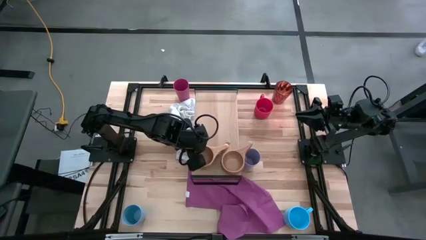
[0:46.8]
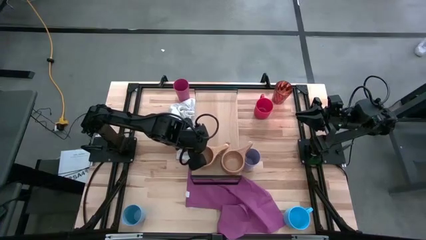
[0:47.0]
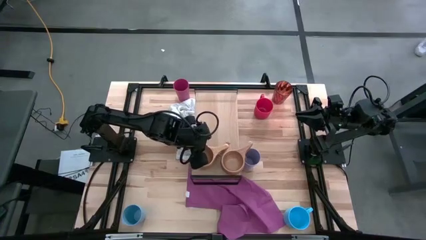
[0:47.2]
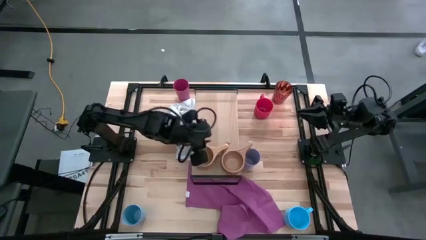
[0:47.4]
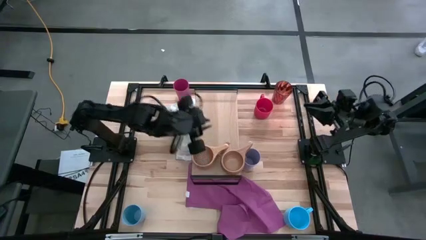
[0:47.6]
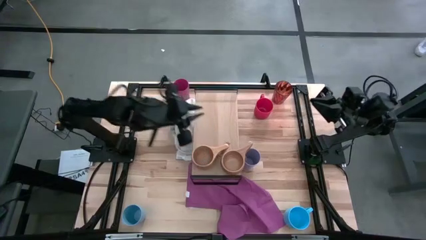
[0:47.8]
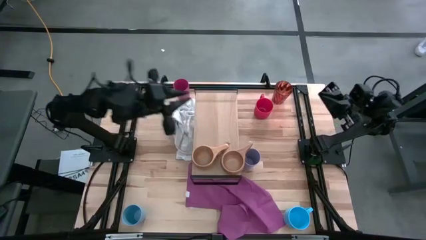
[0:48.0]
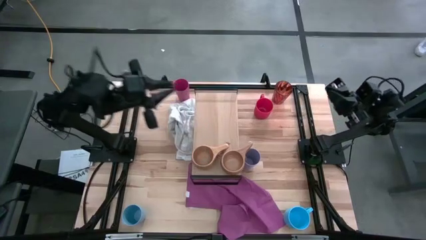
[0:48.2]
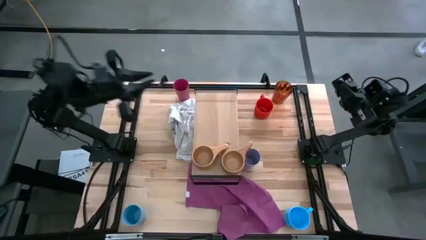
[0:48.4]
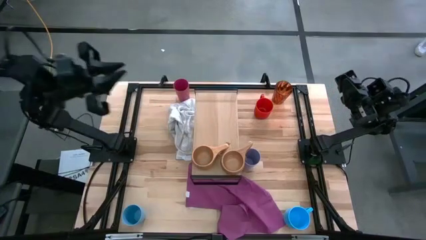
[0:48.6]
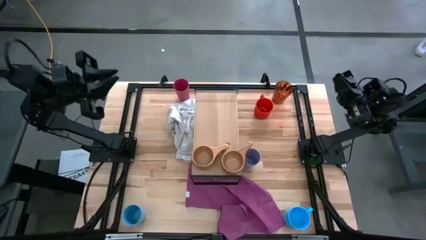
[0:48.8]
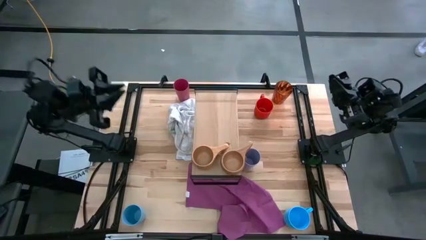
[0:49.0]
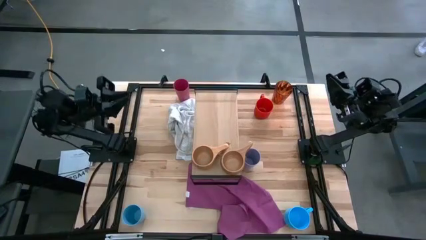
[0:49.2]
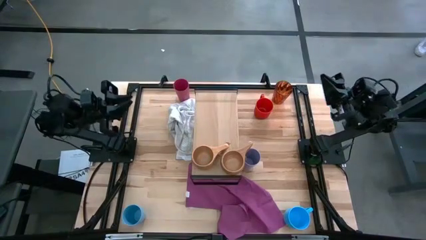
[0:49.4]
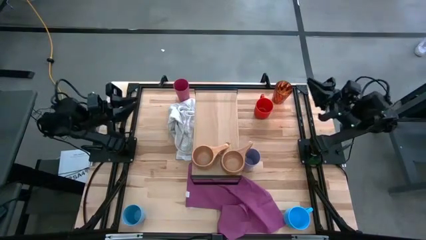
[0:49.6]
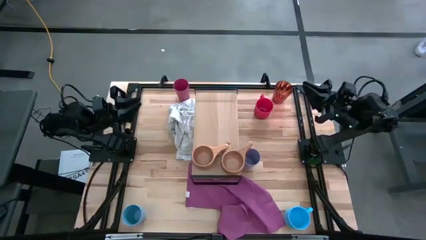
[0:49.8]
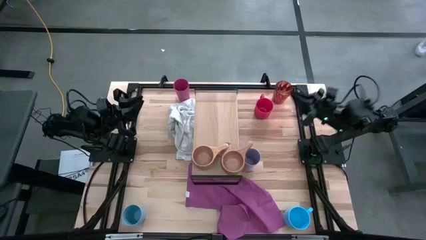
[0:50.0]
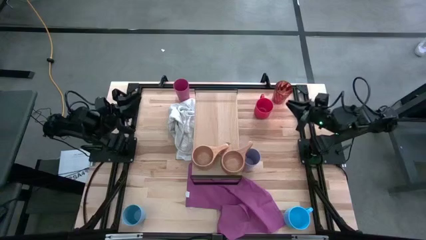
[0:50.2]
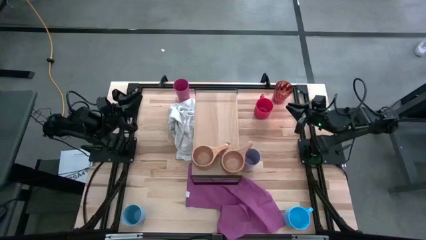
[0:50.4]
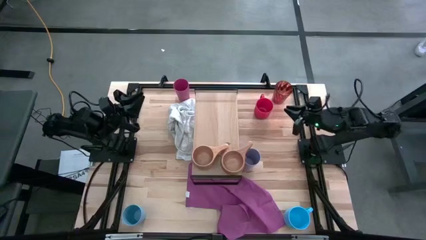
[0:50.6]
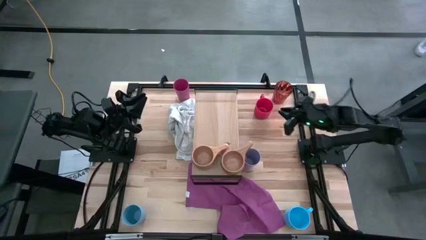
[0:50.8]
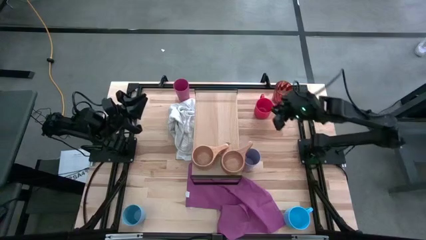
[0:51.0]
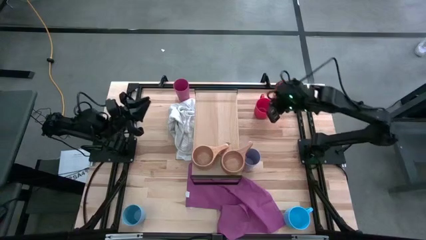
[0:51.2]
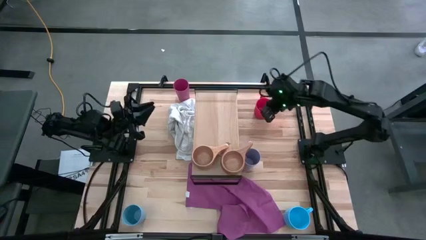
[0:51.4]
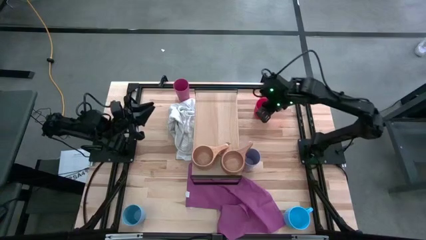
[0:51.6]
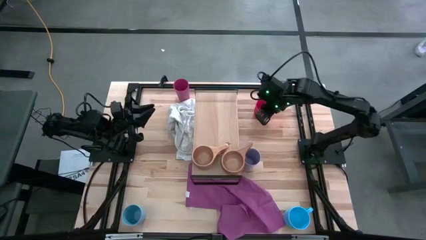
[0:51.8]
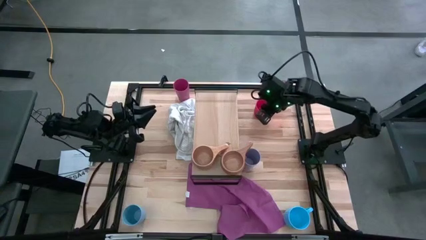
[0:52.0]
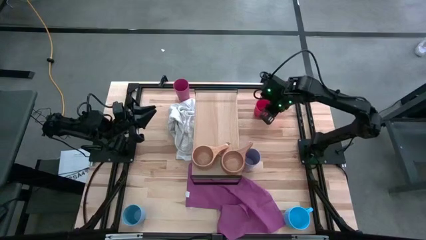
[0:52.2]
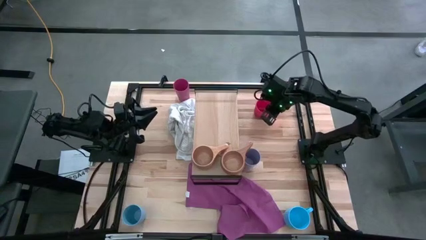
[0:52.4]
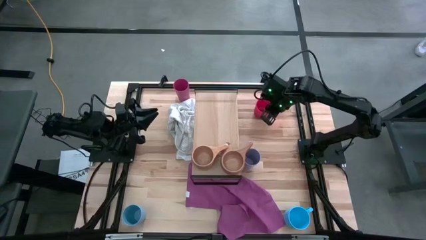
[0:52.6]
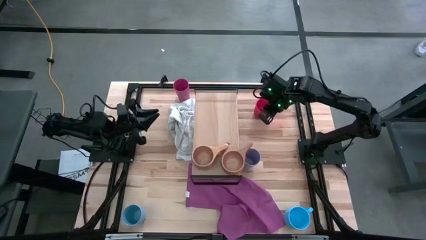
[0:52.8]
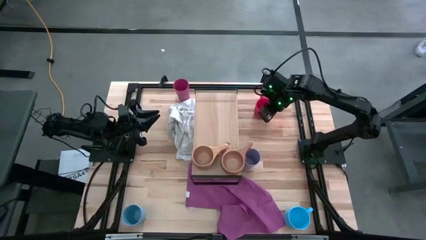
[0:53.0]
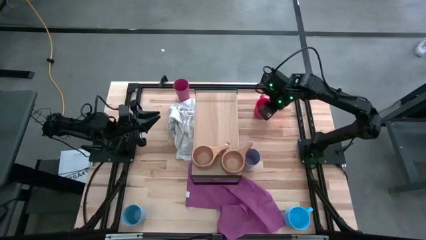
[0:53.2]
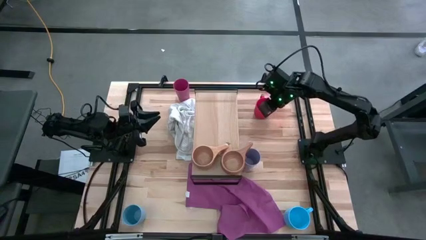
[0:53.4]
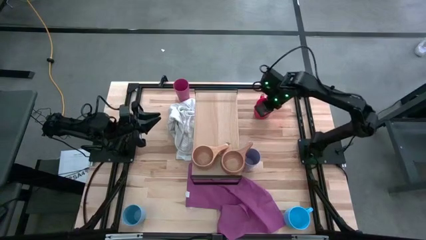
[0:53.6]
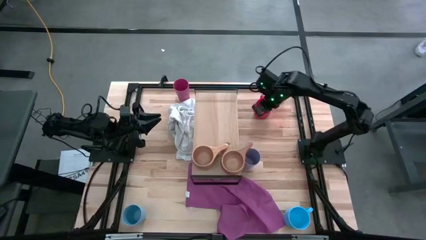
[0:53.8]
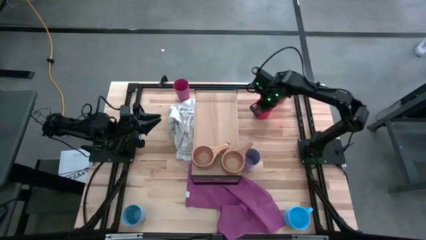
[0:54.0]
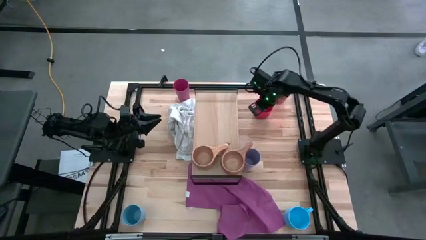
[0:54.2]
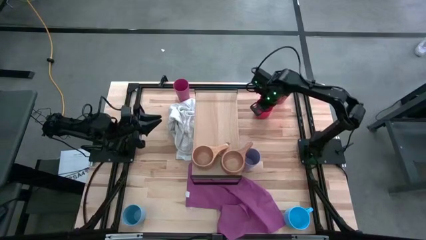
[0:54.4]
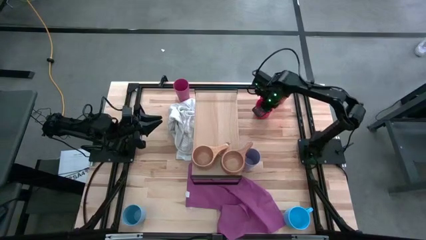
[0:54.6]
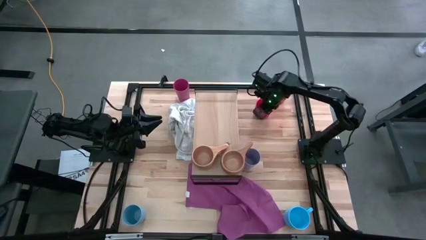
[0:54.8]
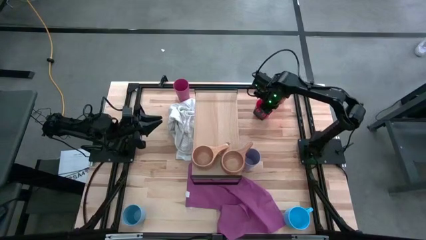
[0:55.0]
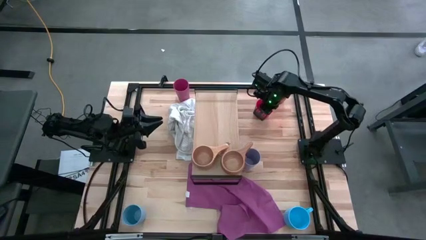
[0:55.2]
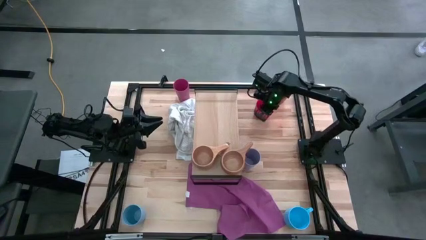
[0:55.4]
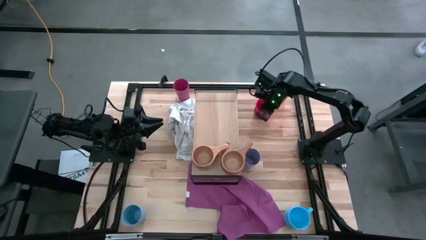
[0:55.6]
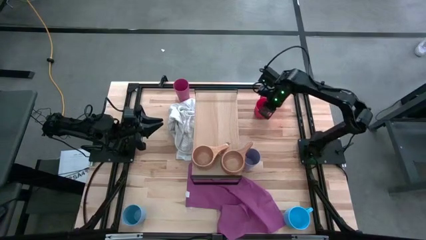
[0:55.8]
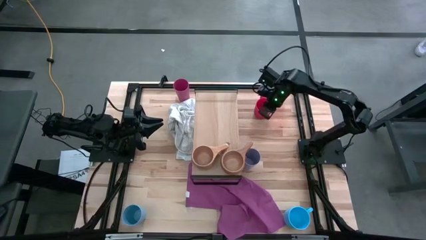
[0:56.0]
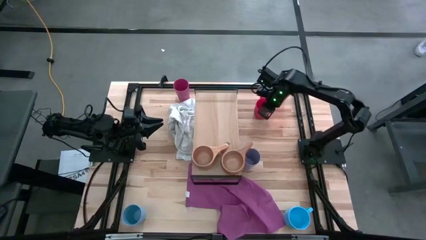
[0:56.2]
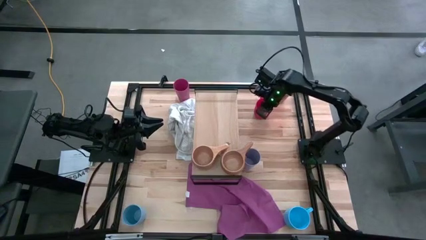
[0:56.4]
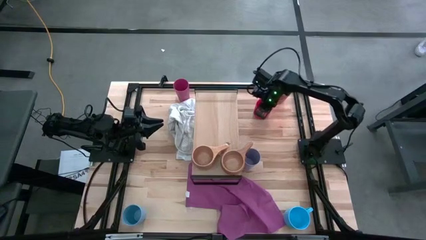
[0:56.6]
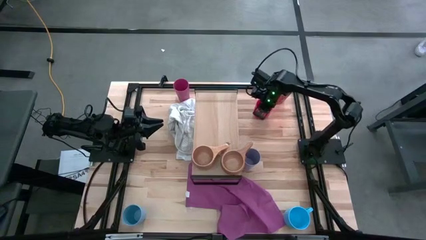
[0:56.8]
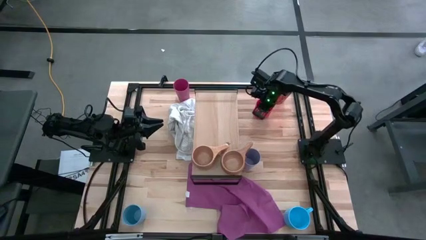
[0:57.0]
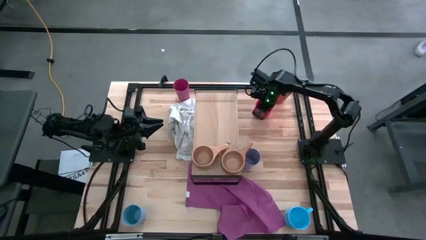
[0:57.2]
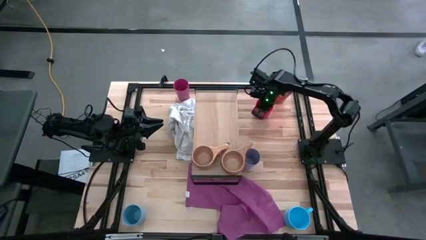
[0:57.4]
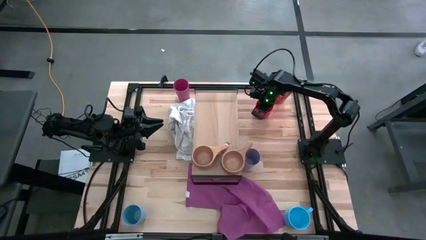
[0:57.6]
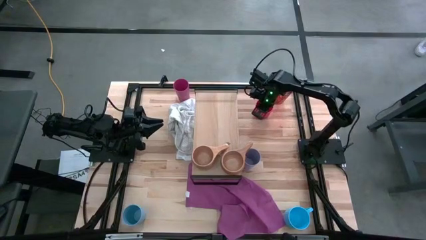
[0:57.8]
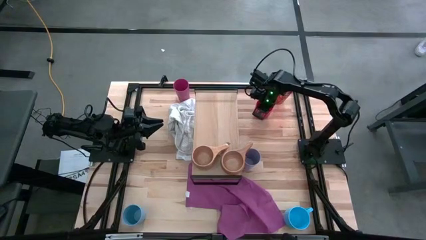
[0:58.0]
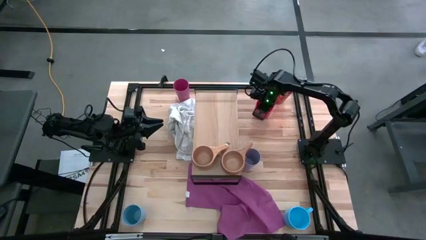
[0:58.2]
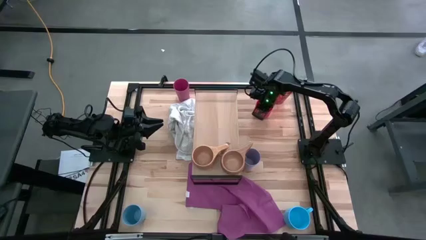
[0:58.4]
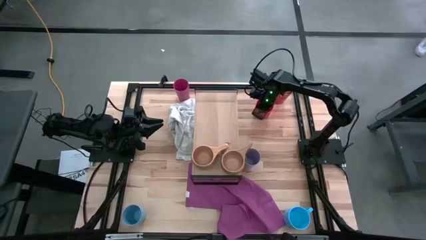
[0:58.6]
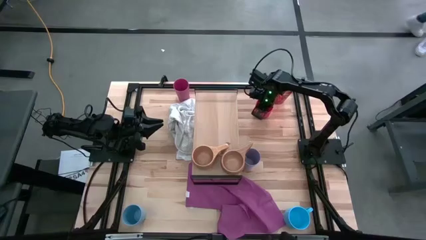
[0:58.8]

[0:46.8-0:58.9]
Task: Stack small to large cups/mugs on shelf
Put the red mug on the shelf
